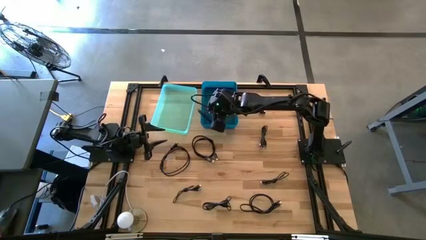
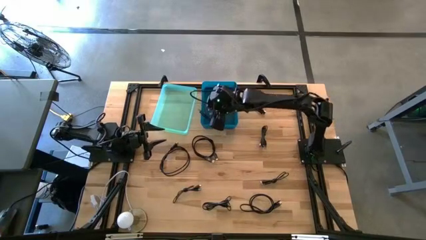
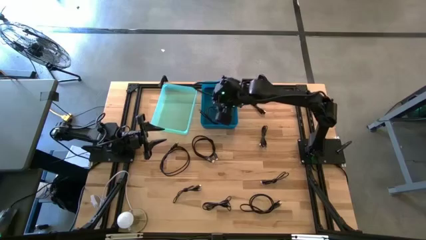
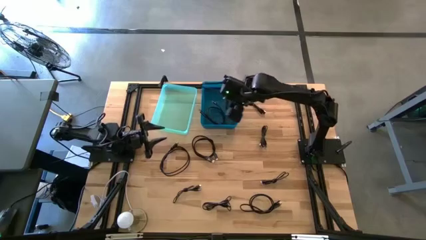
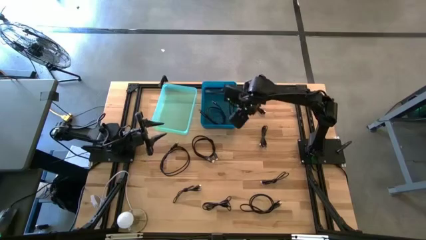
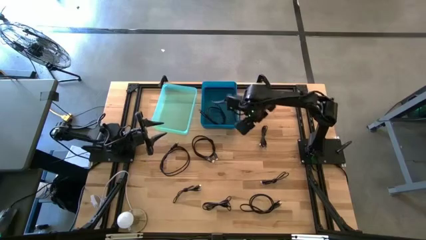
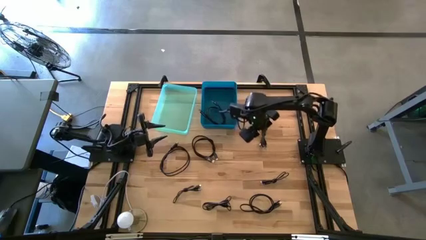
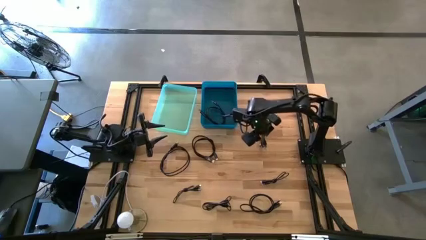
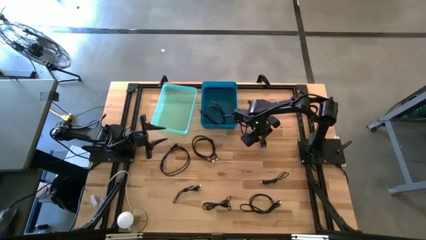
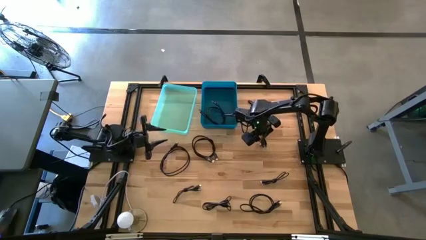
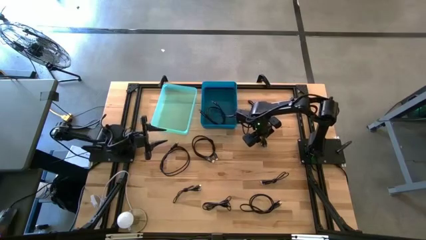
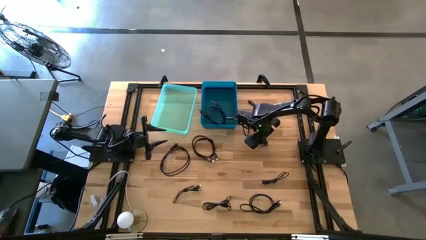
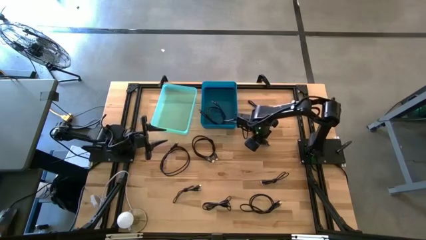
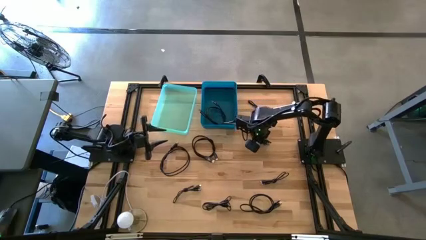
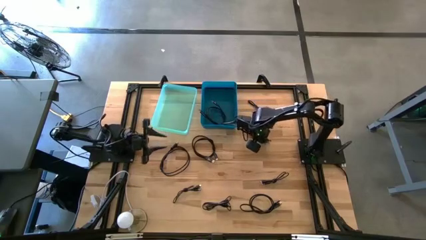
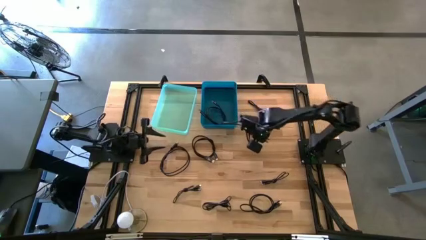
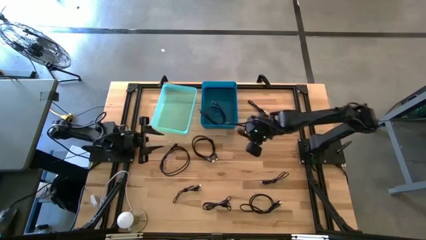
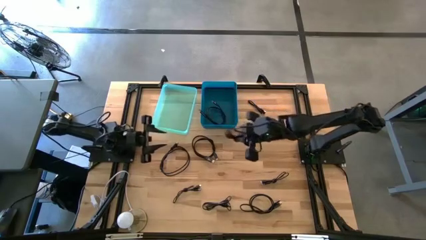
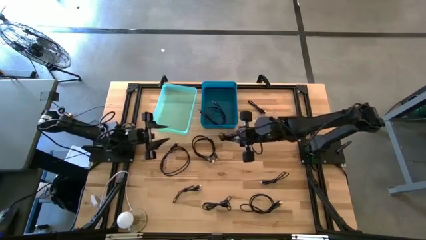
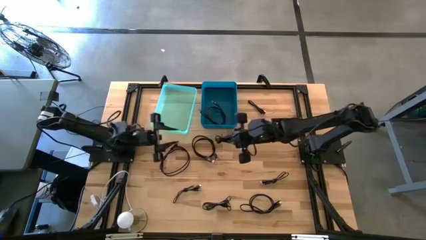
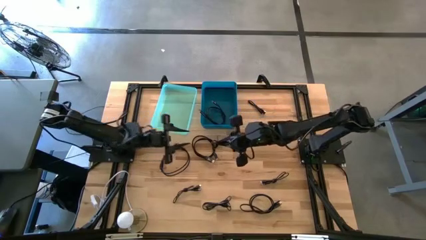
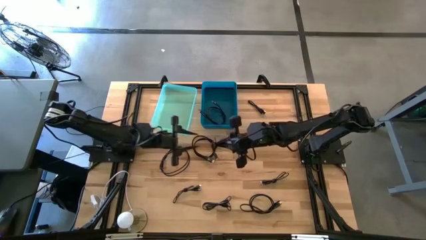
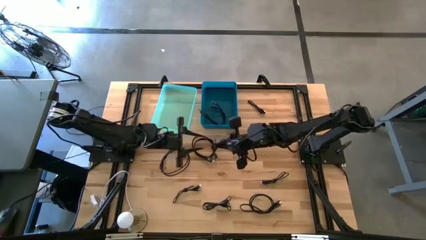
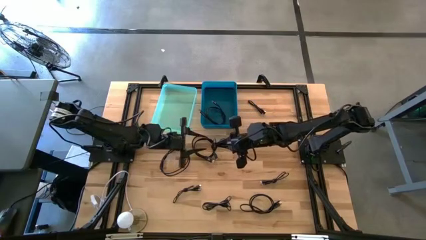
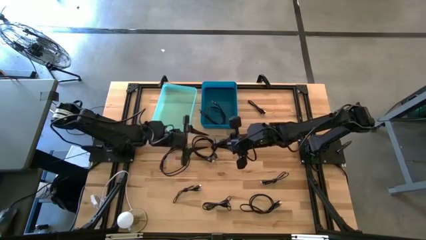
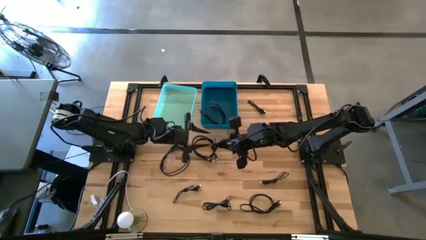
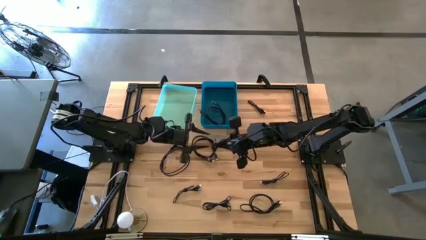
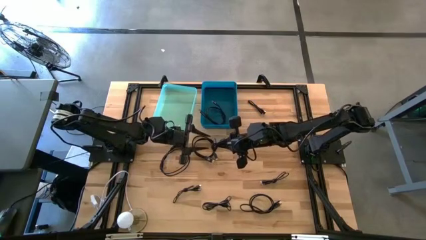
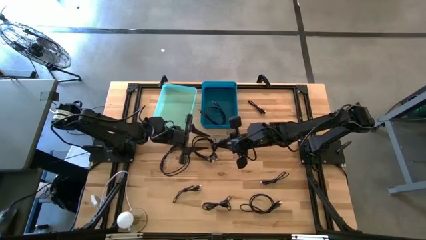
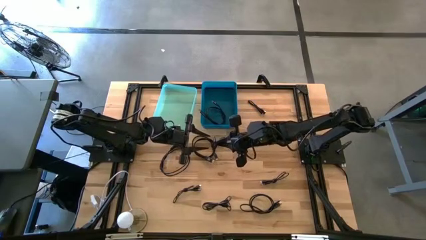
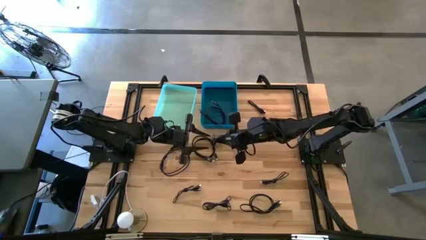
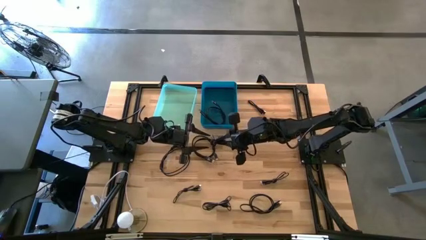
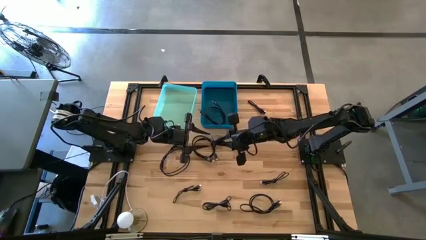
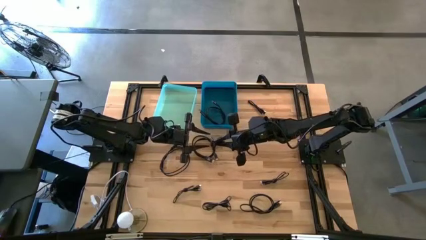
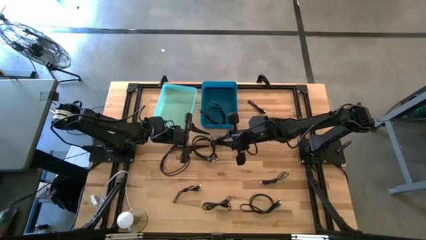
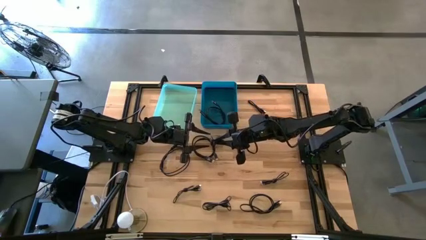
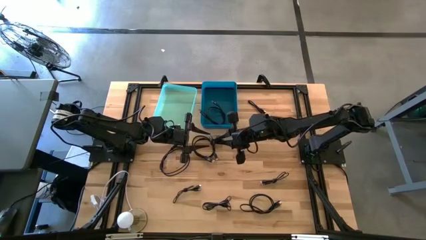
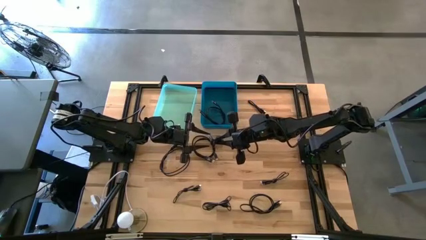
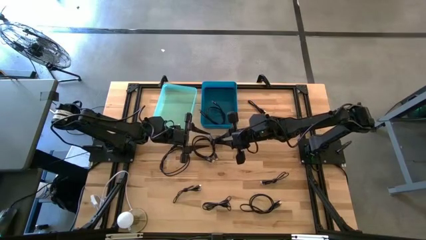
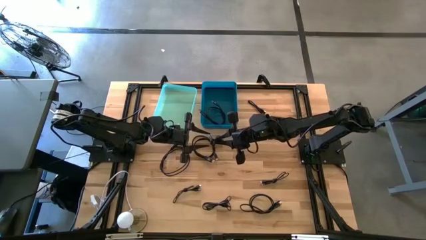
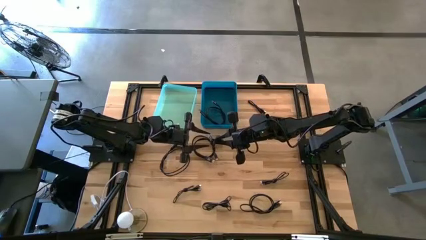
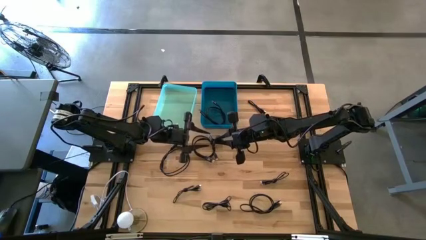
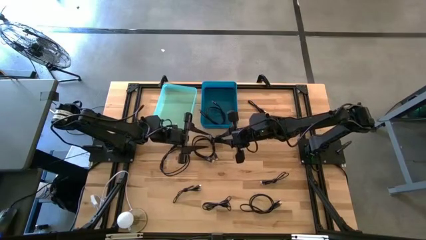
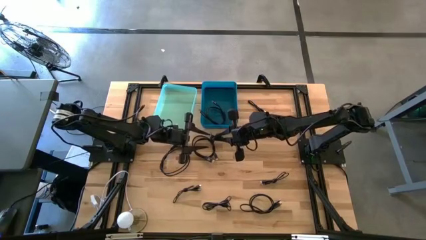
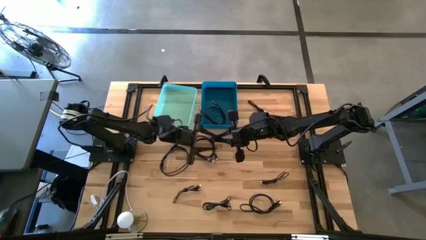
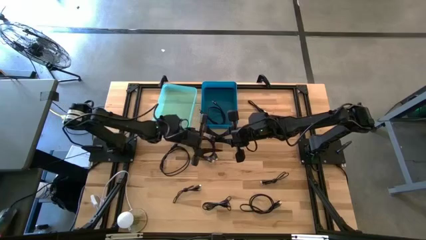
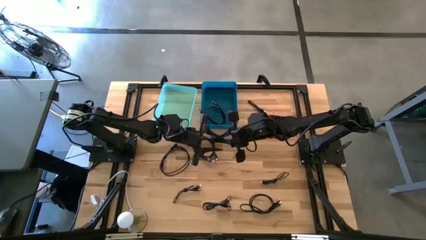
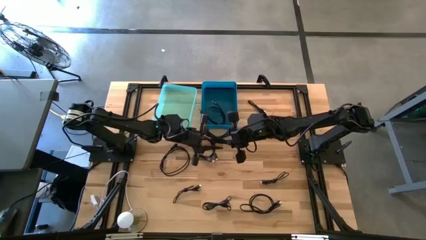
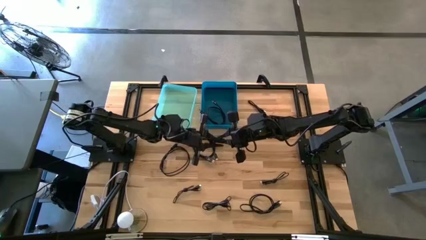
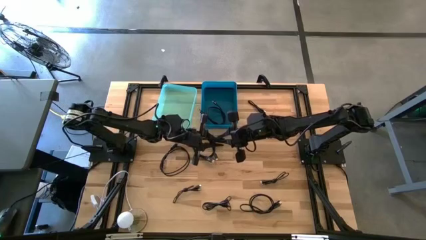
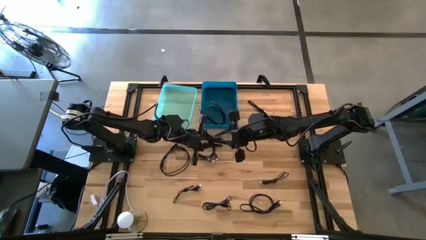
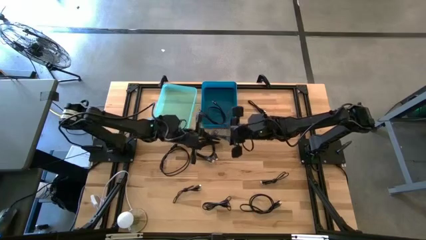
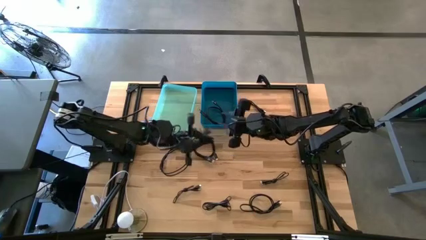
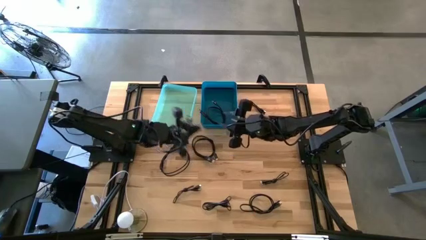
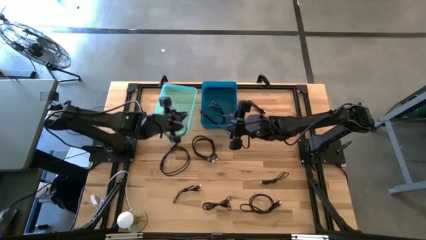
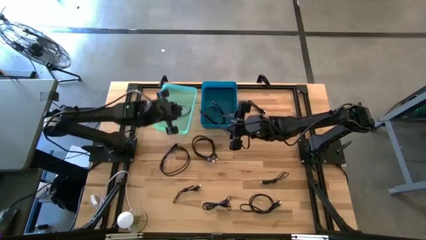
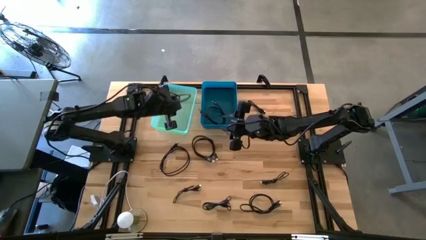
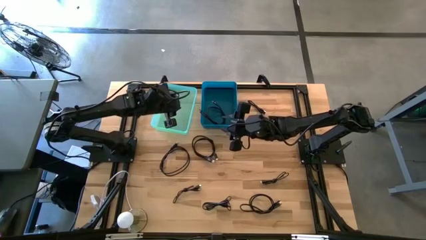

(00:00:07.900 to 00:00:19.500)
Task: Pick & Place USB Port
Put the black USB cable into the green bin

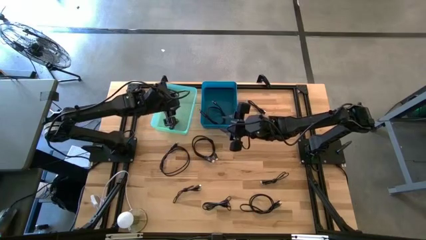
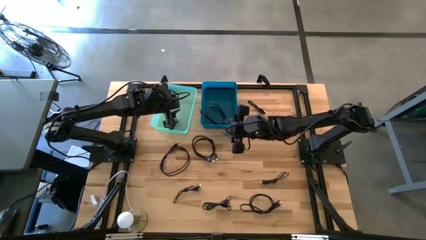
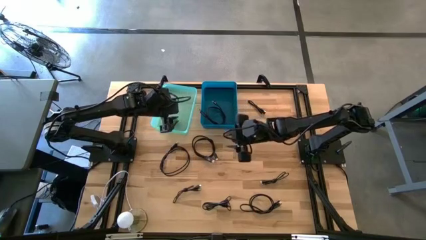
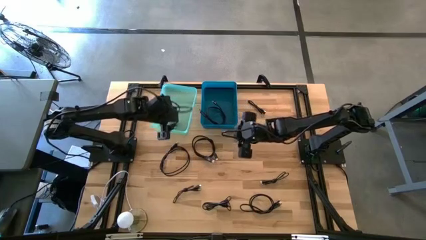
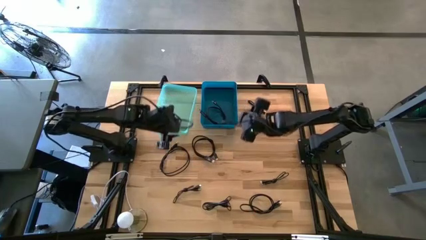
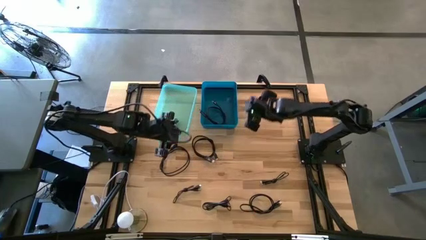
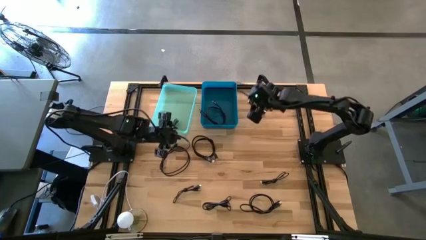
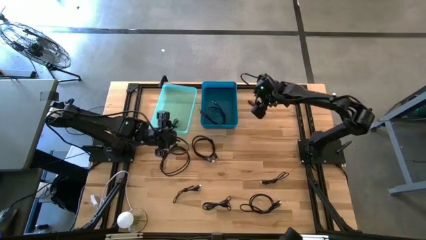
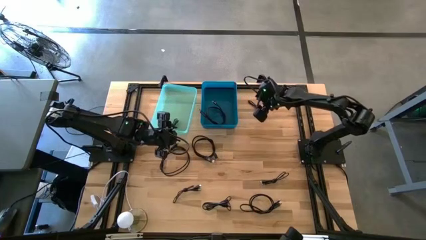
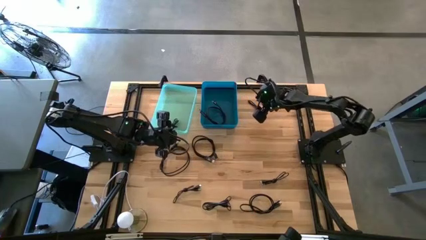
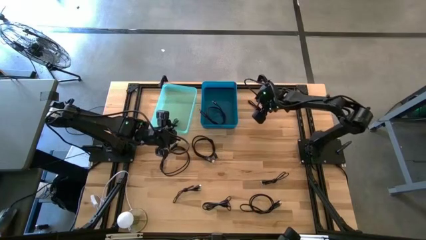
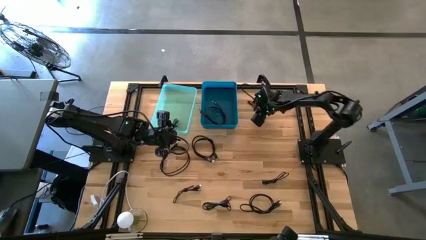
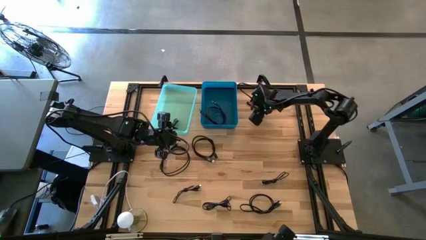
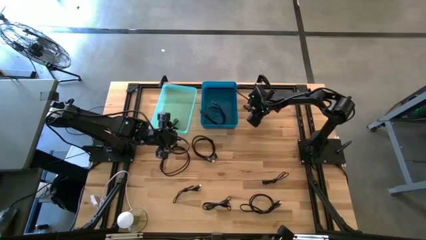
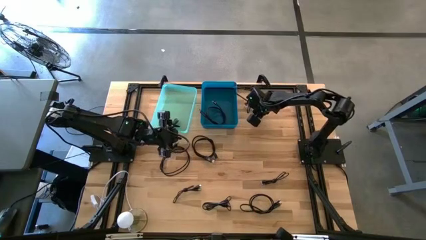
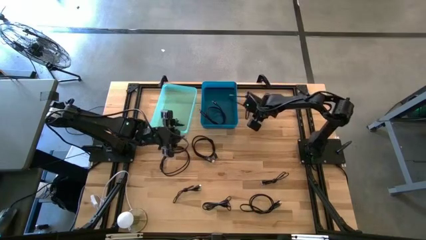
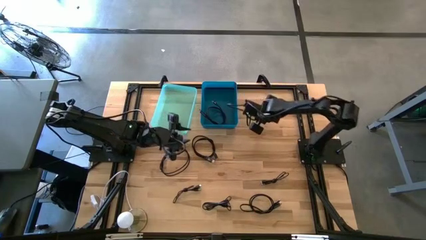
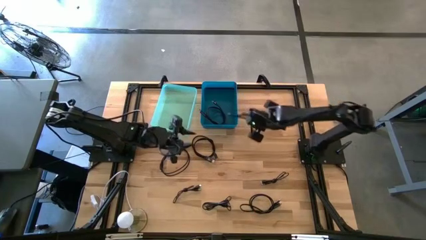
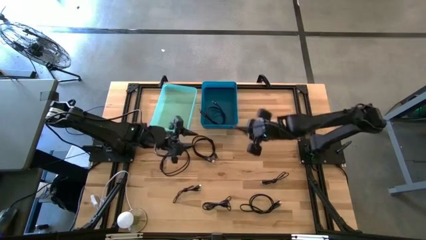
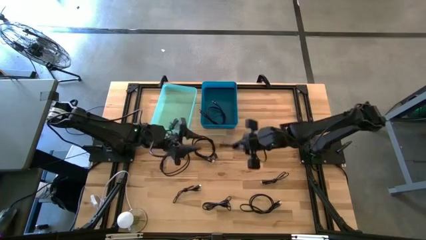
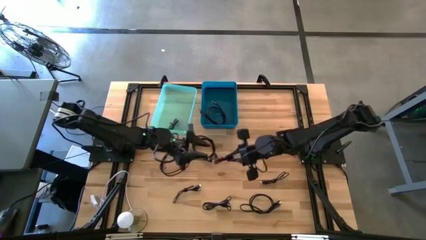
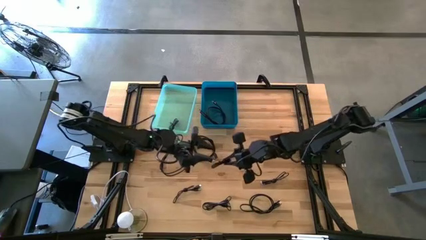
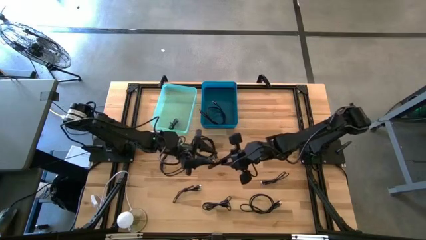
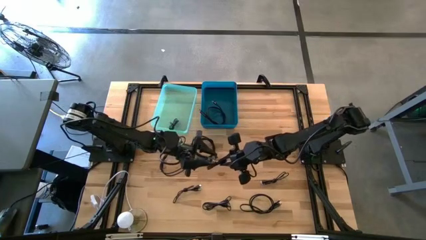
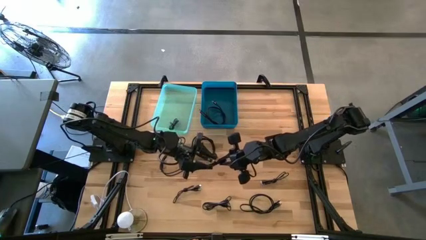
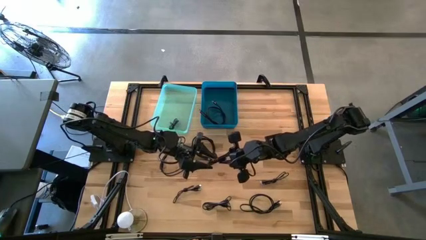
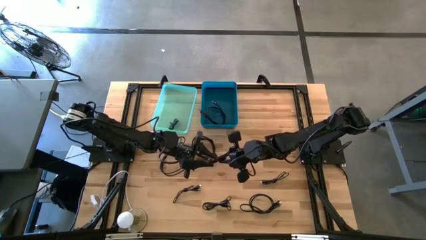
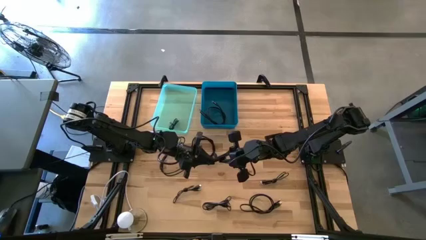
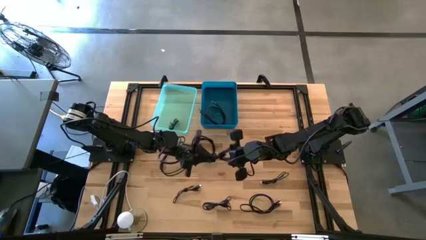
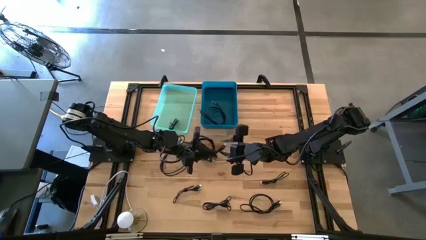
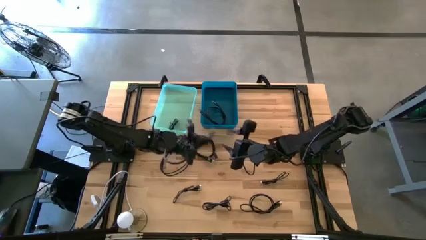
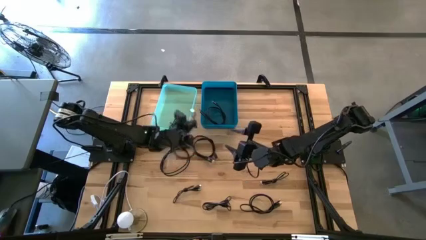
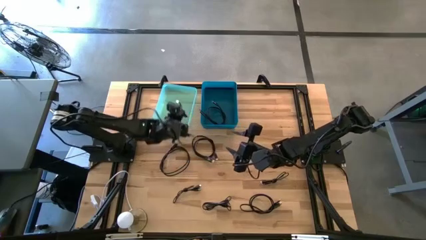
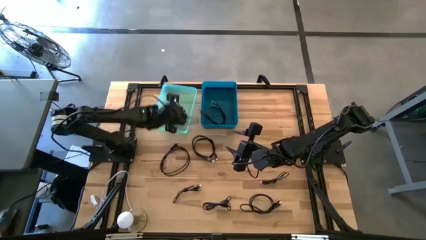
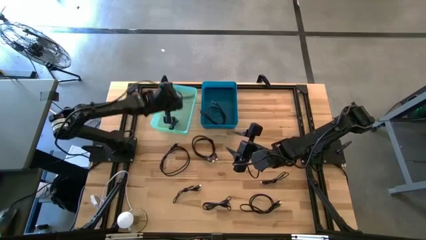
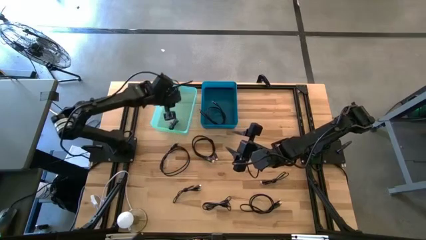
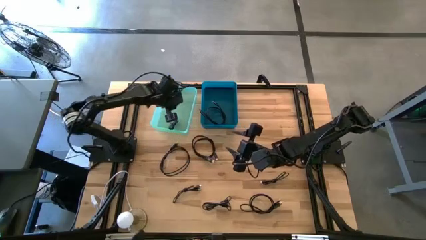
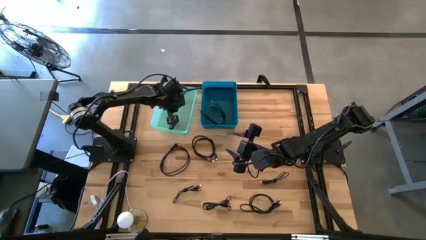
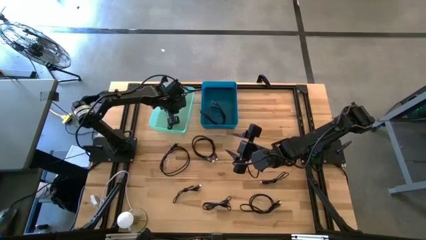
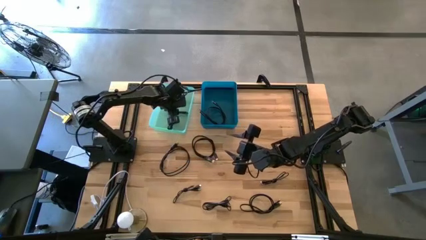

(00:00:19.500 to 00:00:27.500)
Put the black USB cable into the green bin
